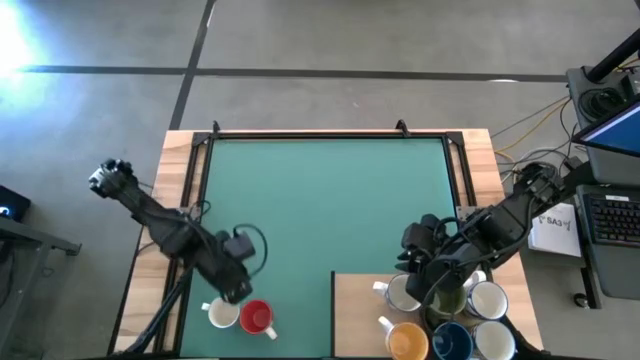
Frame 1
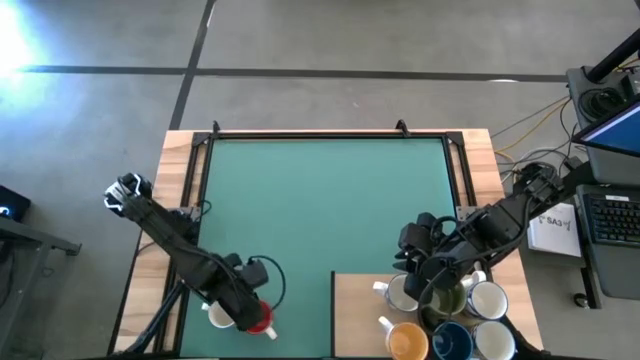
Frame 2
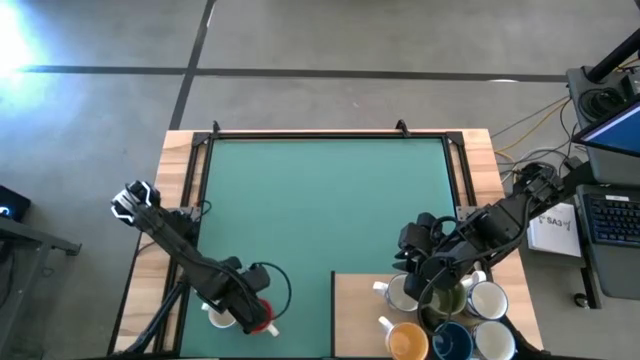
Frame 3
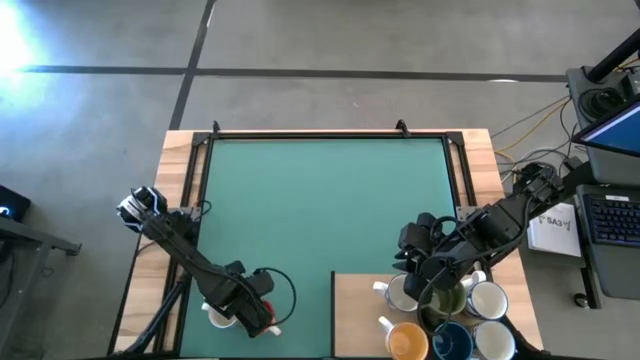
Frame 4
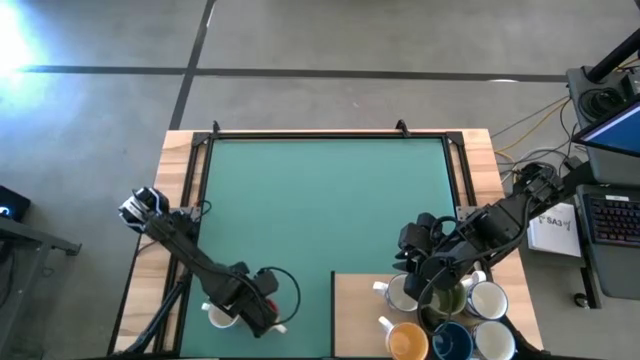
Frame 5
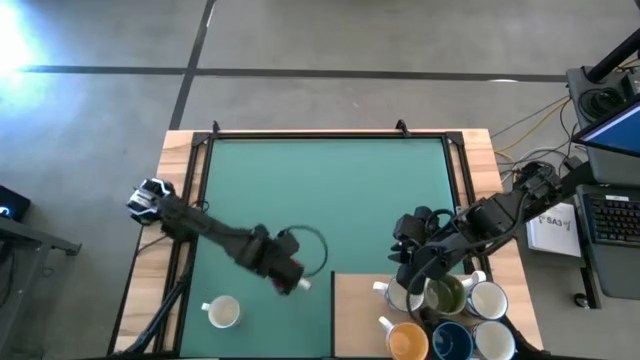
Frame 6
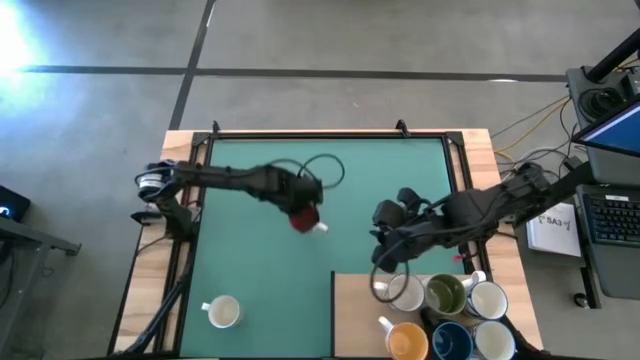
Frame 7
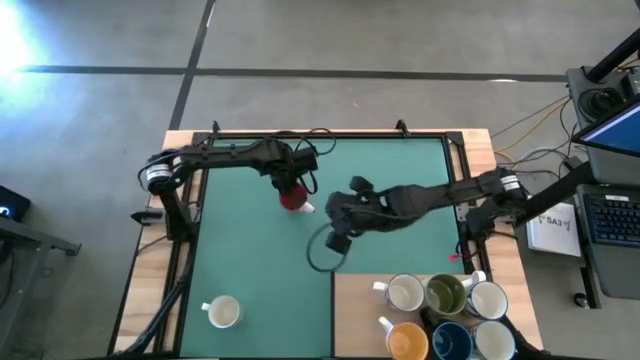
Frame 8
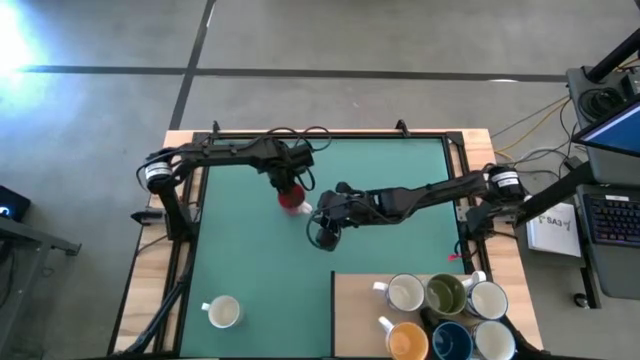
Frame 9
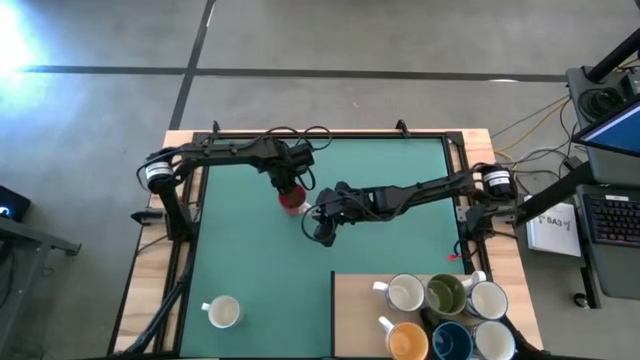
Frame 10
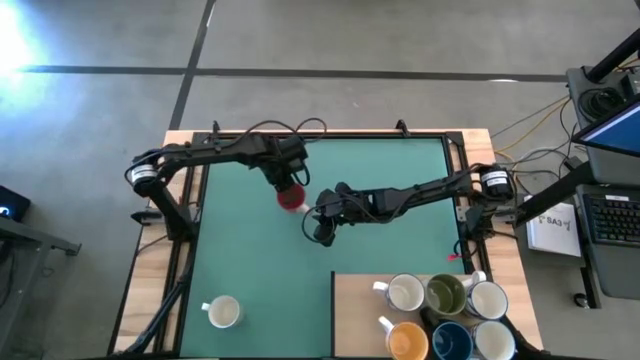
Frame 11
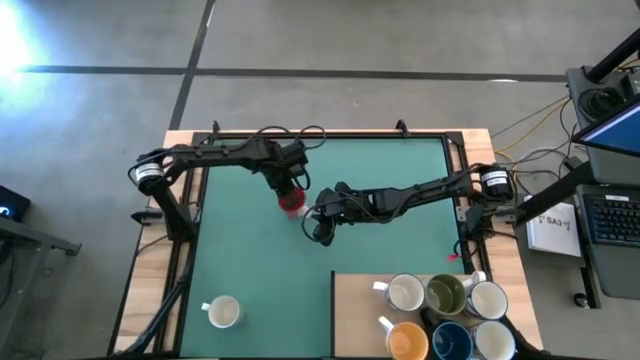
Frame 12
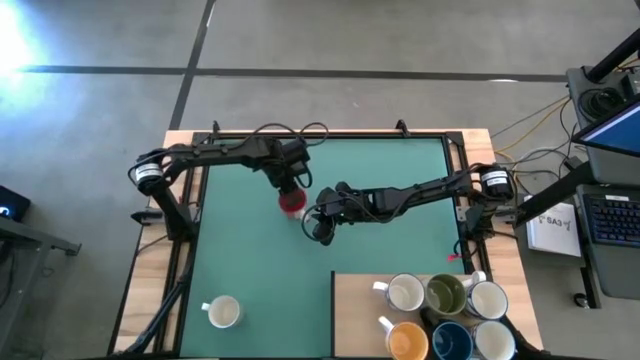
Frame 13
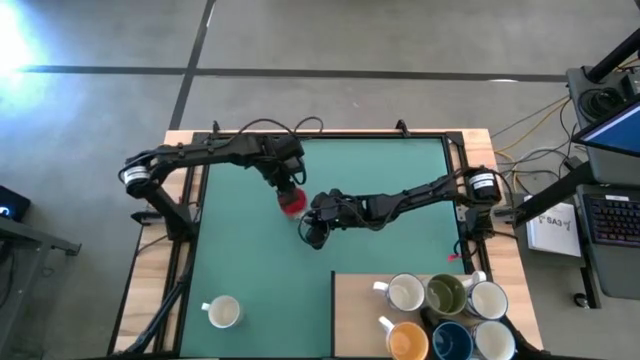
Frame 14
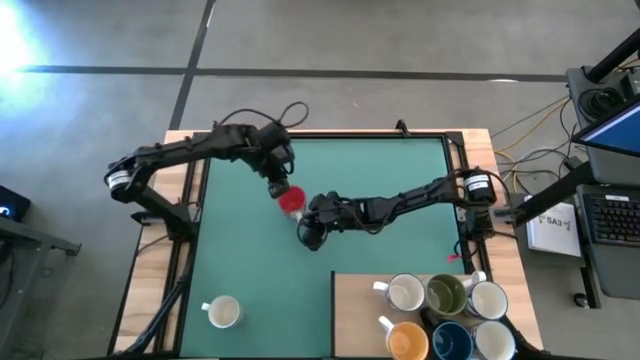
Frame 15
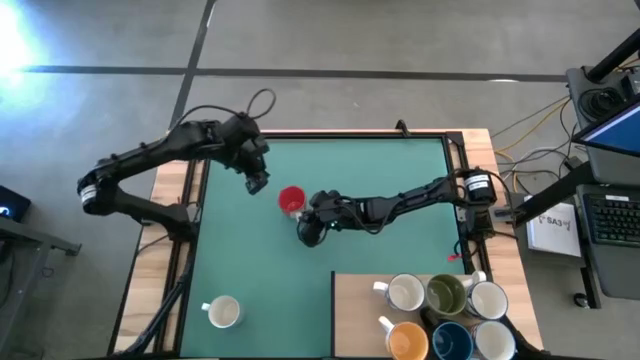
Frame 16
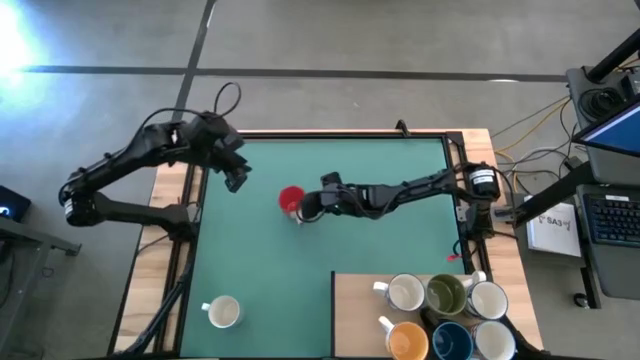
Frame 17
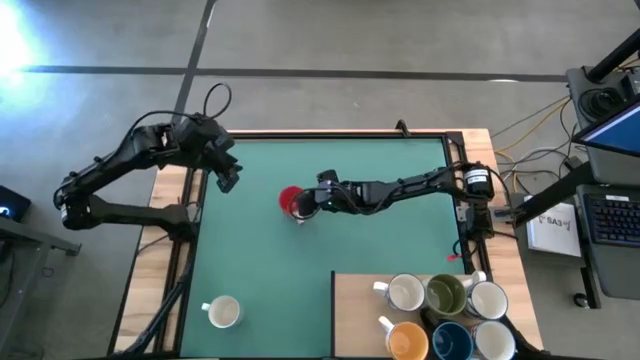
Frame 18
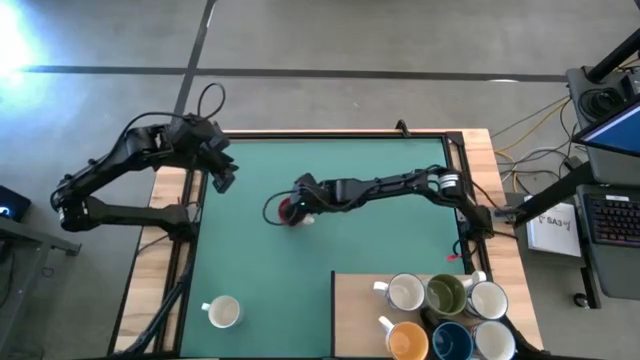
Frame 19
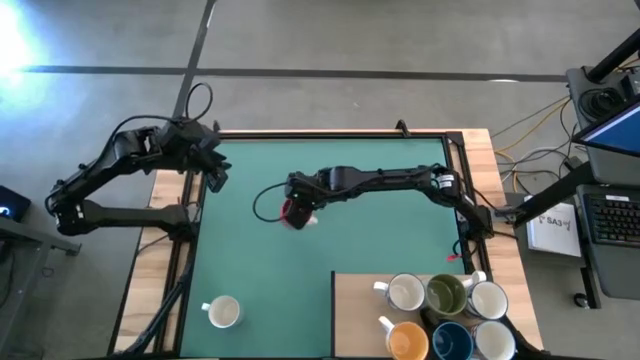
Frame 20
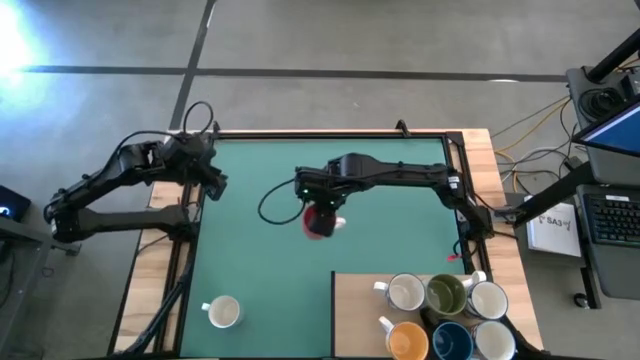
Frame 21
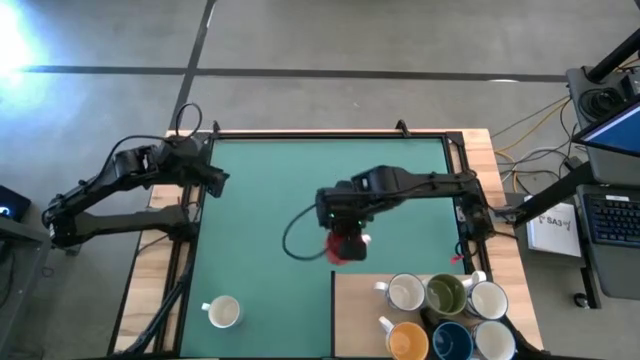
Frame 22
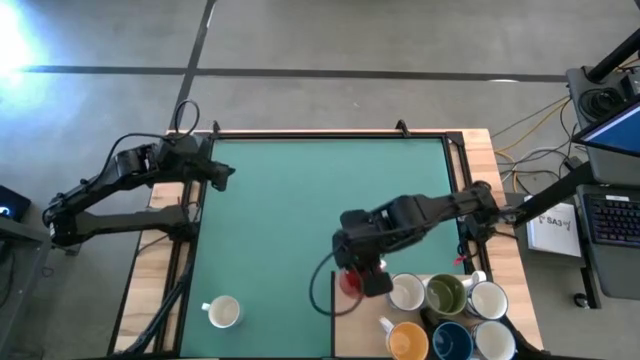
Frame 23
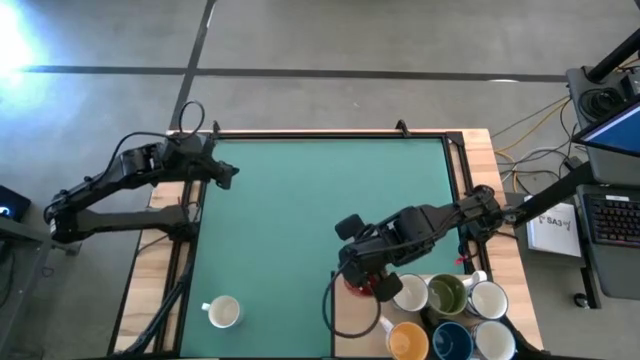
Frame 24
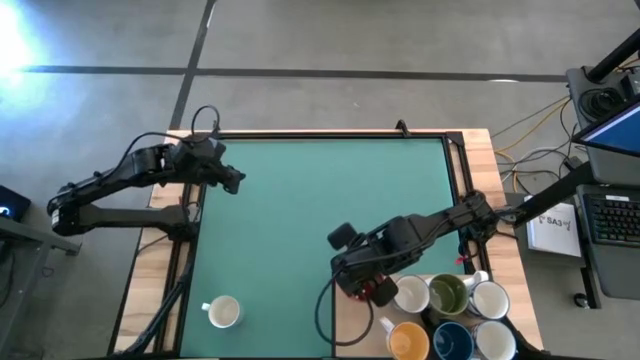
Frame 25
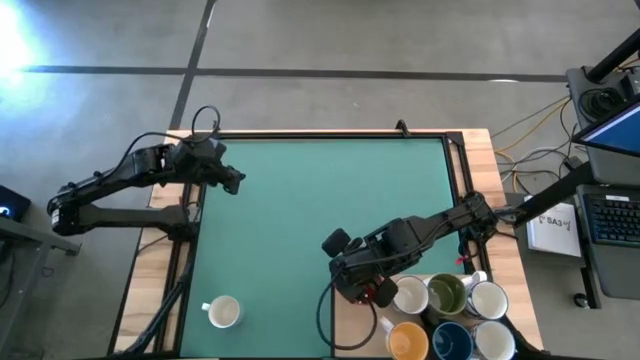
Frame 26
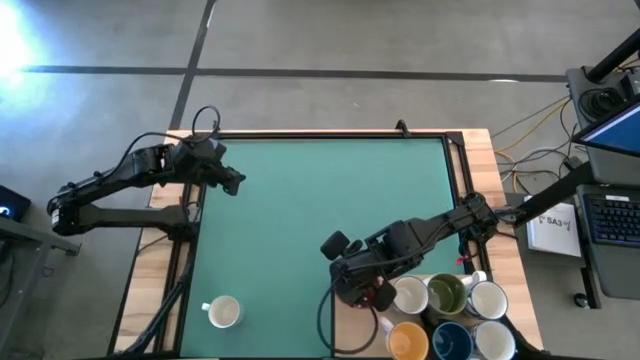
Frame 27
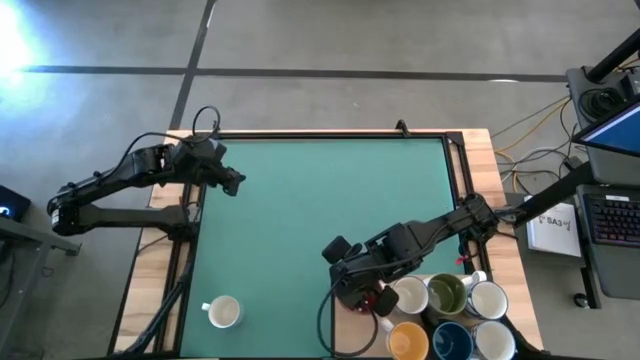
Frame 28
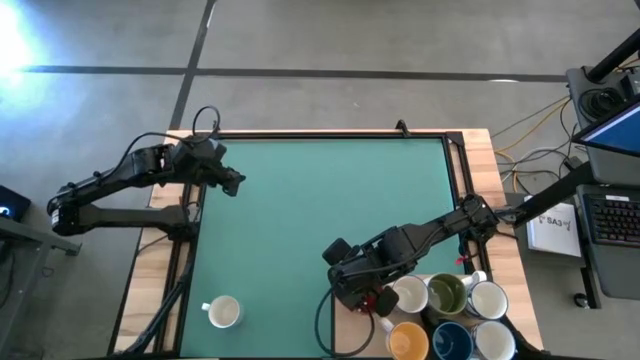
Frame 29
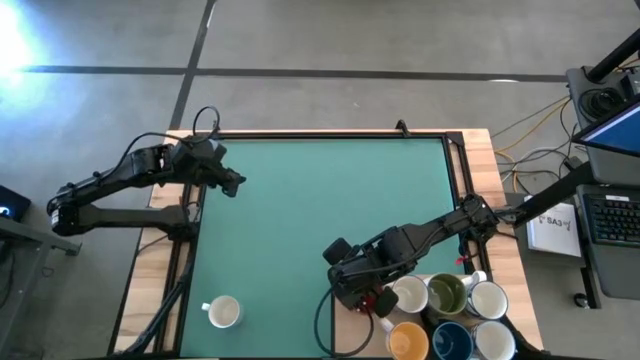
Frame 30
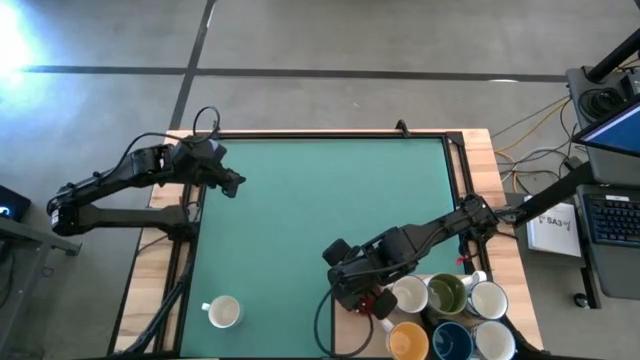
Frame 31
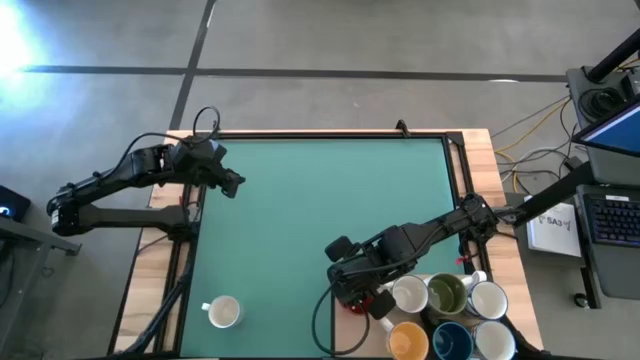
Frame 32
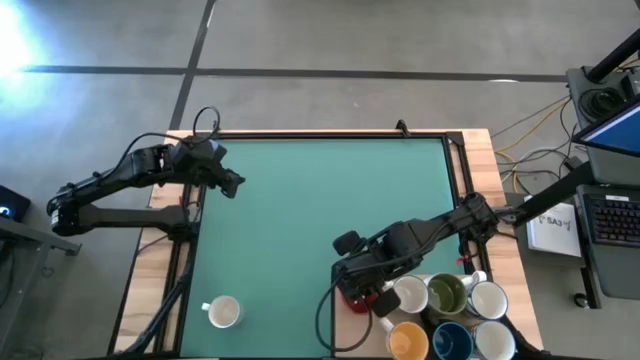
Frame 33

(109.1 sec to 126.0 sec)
Task: Place coffee mugs
Put the red mug on the shelf

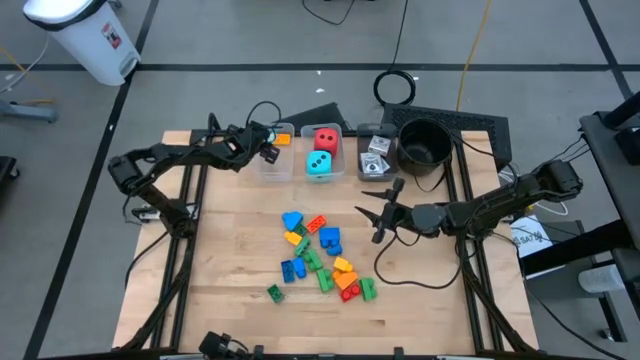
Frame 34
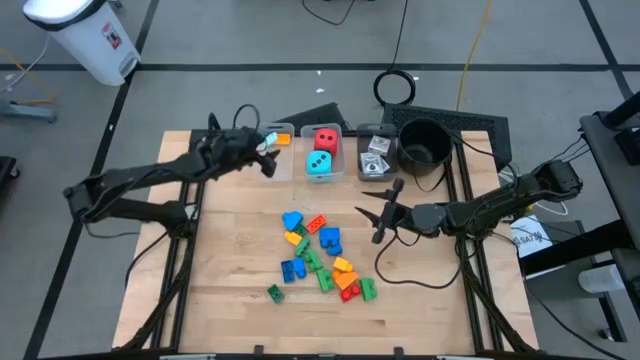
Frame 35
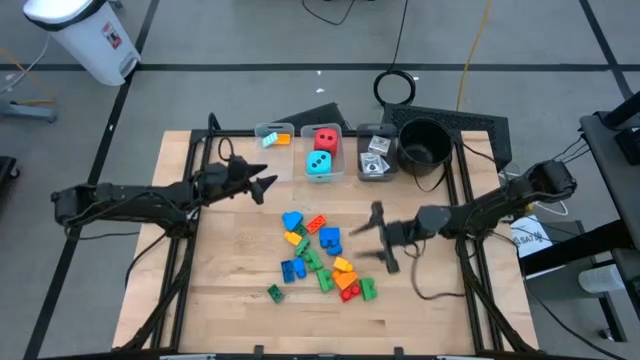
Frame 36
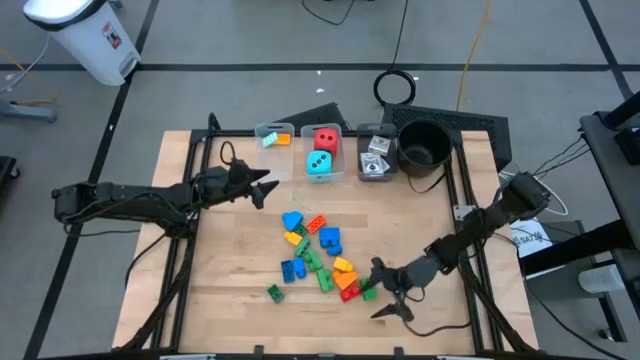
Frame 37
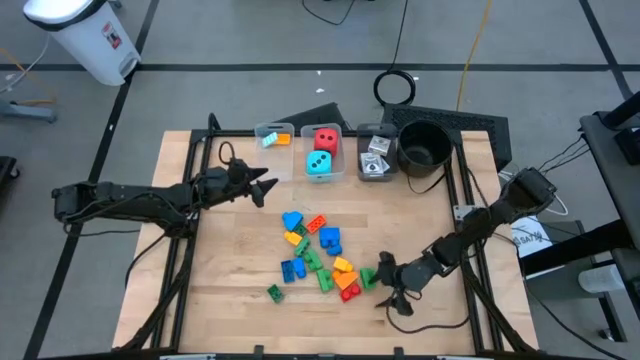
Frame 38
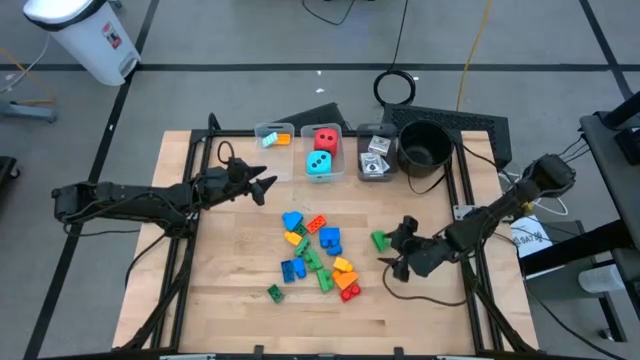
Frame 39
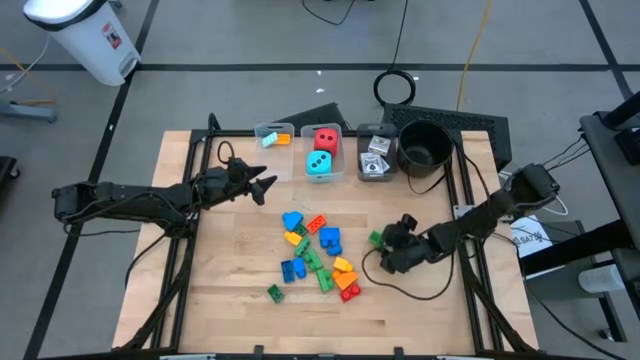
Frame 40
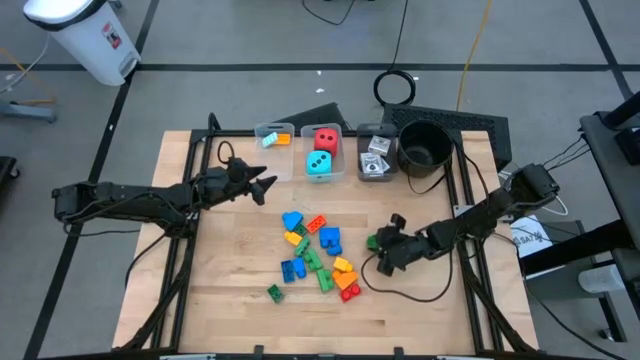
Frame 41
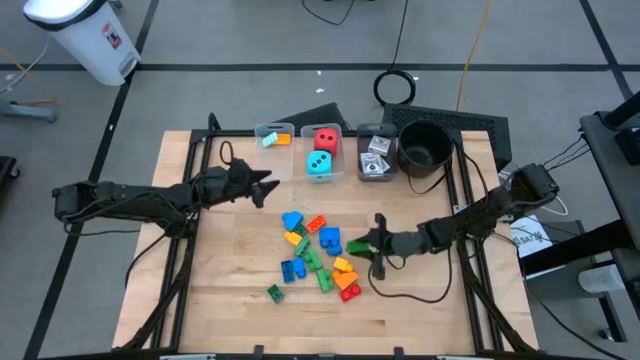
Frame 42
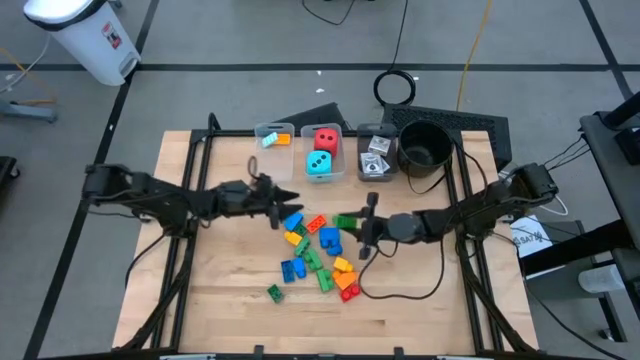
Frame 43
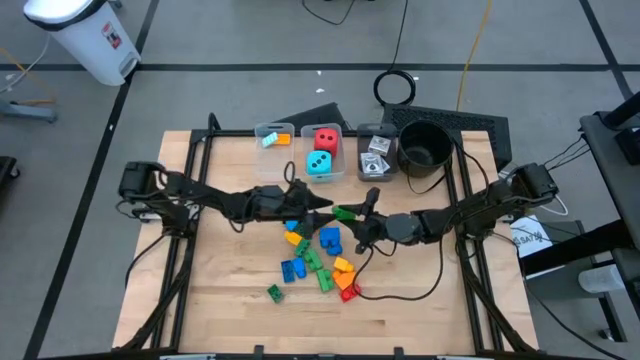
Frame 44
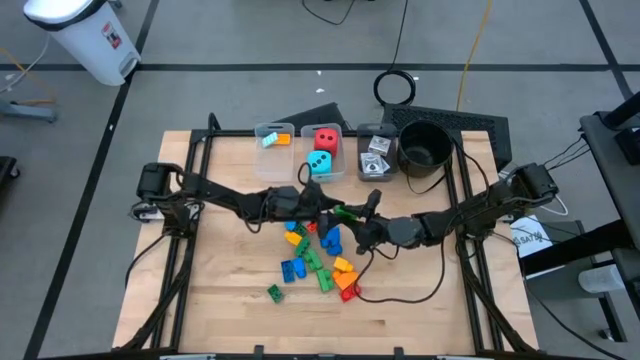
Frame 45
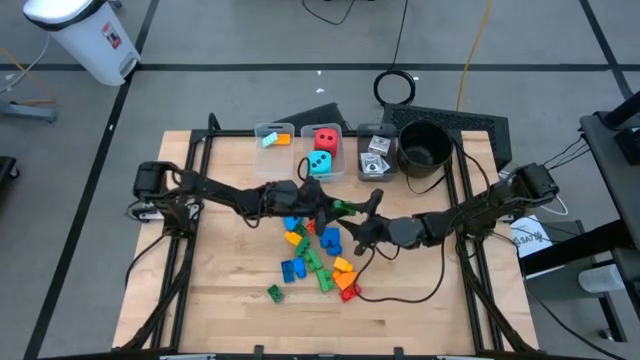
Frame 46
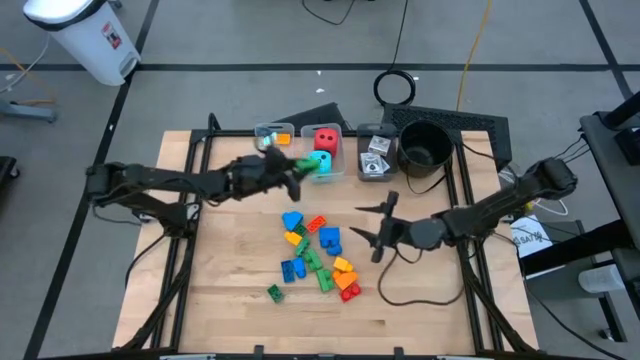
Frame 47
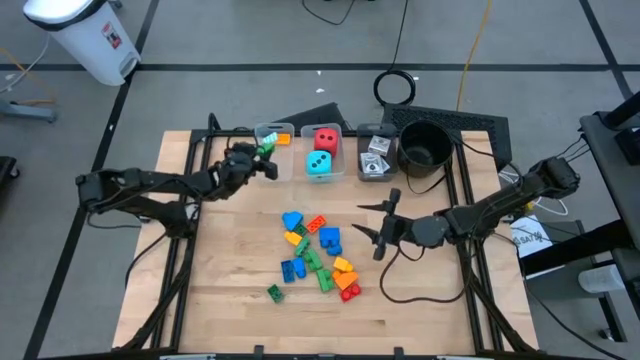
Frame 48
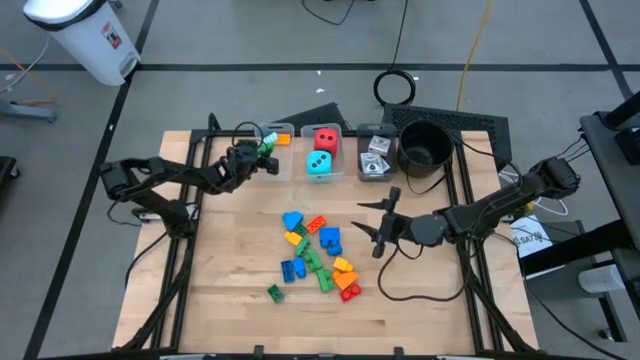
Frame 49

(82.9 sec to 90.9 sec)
Task: Pick & Place Toys
Put the green game piece into the left transparent bin
